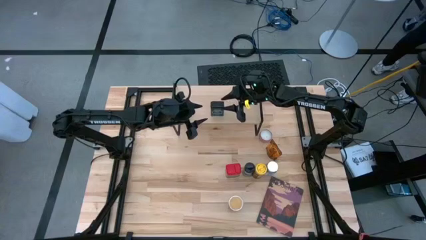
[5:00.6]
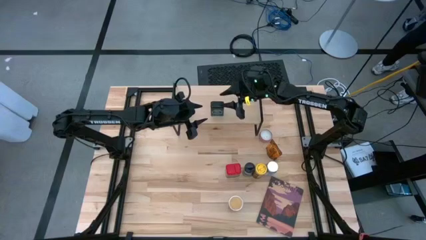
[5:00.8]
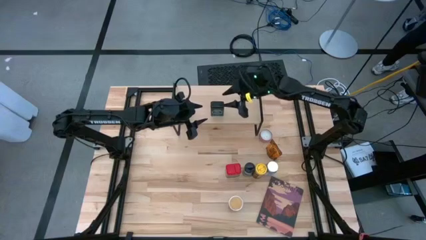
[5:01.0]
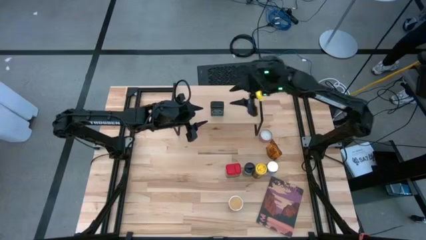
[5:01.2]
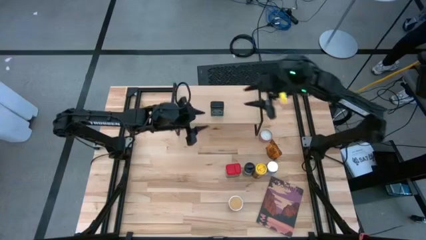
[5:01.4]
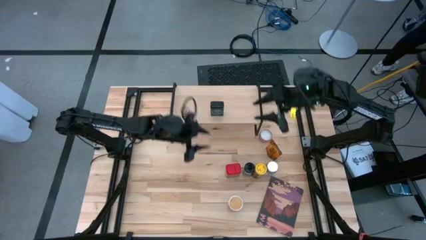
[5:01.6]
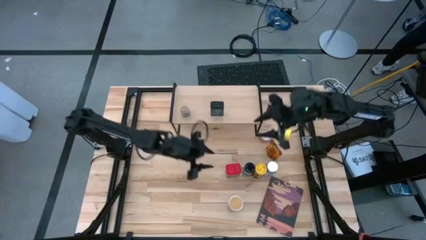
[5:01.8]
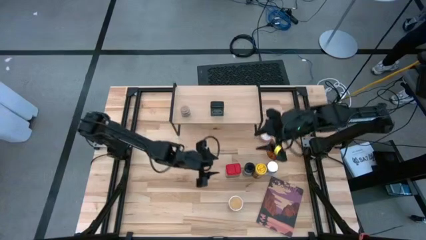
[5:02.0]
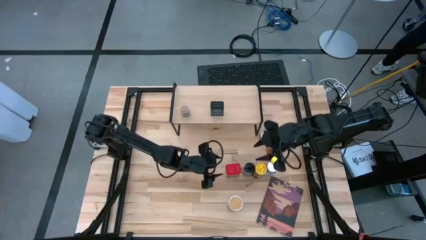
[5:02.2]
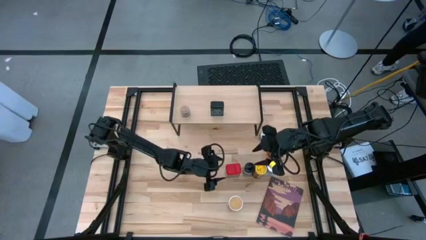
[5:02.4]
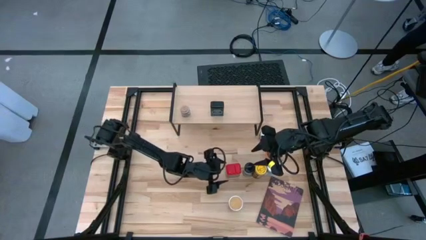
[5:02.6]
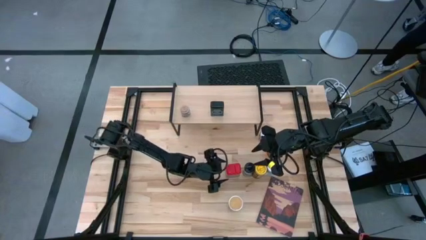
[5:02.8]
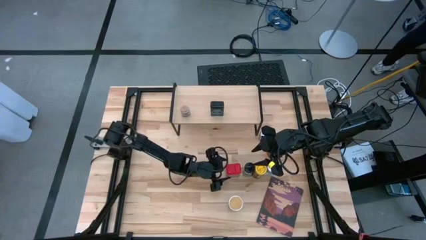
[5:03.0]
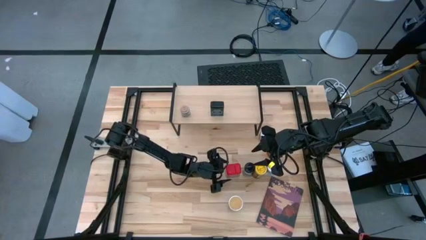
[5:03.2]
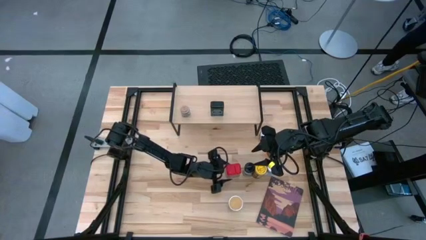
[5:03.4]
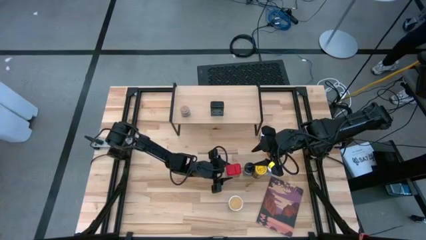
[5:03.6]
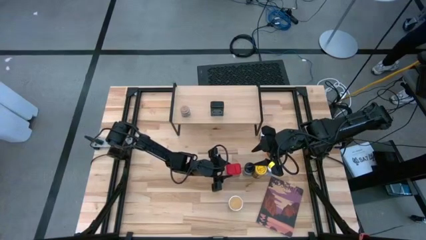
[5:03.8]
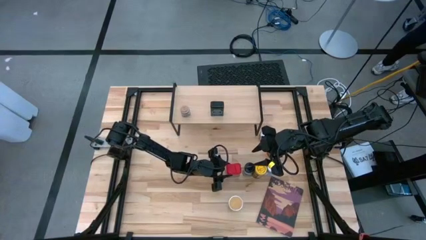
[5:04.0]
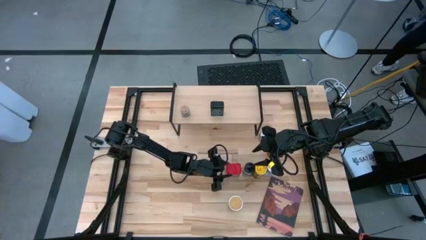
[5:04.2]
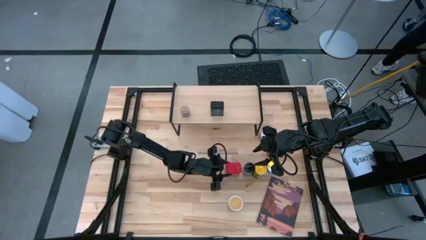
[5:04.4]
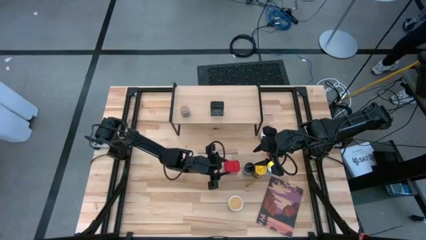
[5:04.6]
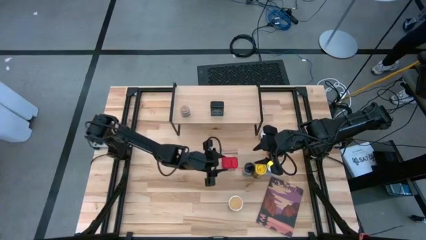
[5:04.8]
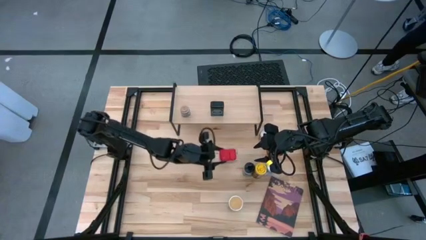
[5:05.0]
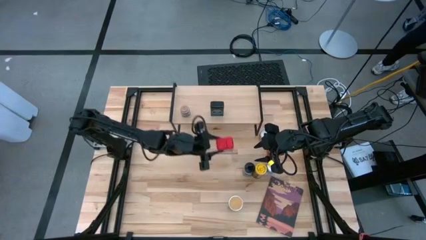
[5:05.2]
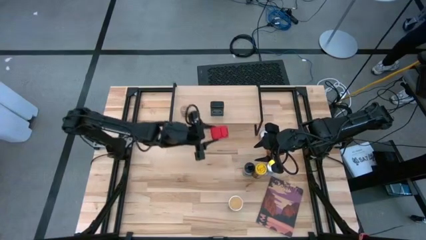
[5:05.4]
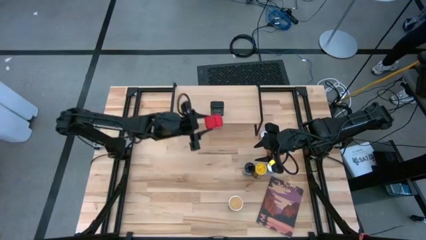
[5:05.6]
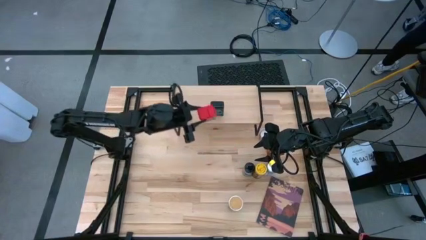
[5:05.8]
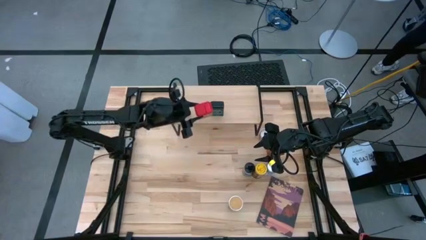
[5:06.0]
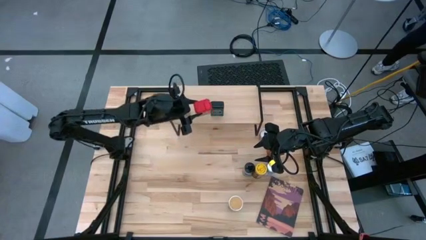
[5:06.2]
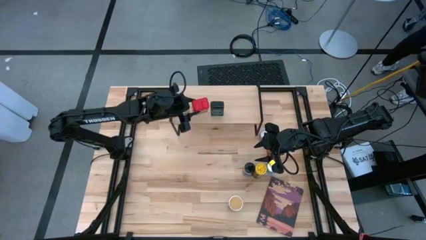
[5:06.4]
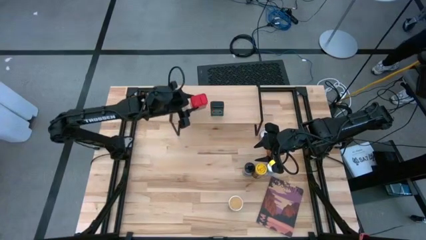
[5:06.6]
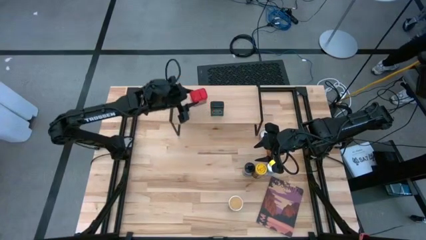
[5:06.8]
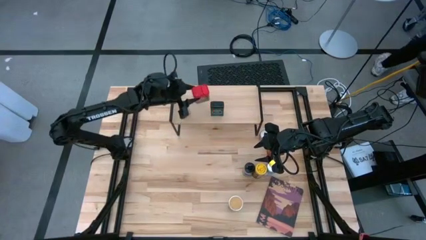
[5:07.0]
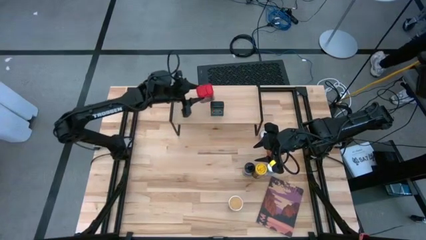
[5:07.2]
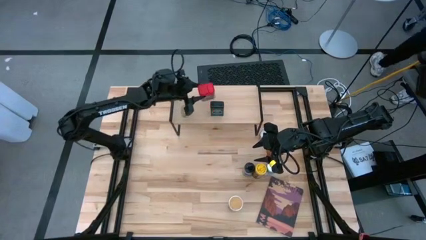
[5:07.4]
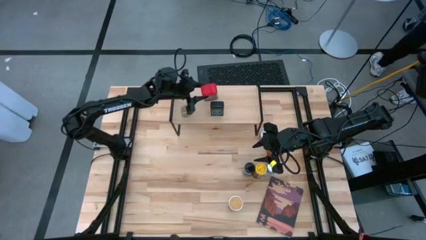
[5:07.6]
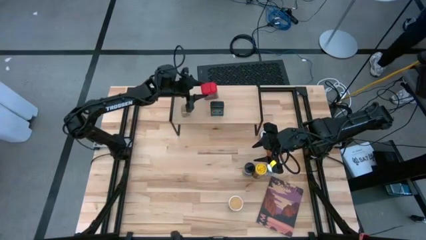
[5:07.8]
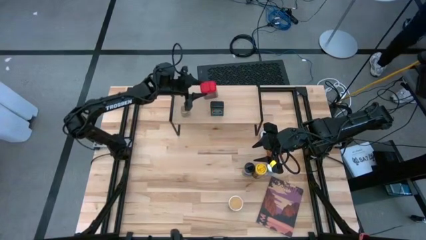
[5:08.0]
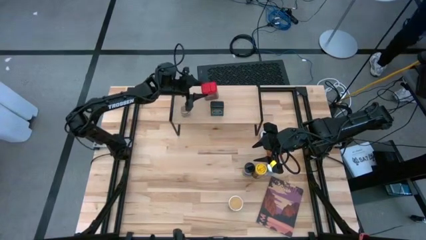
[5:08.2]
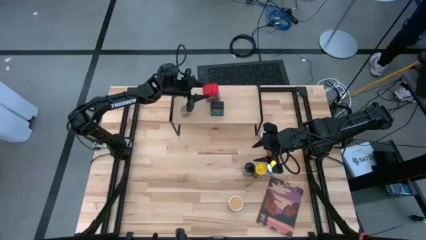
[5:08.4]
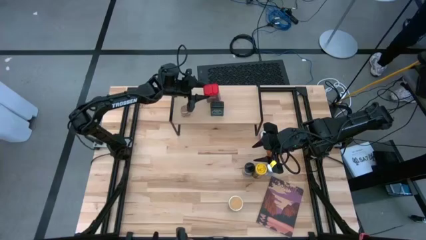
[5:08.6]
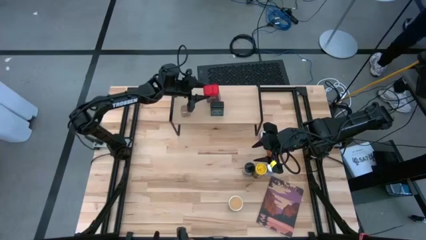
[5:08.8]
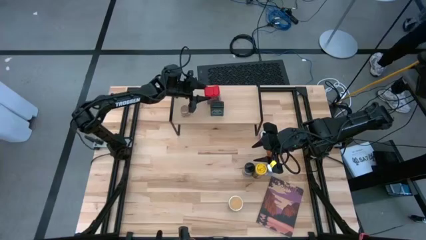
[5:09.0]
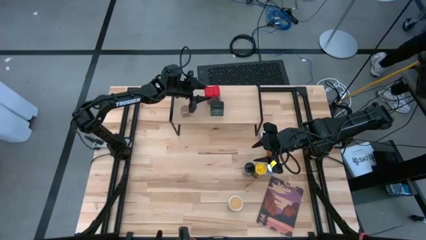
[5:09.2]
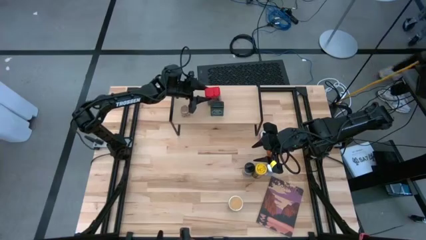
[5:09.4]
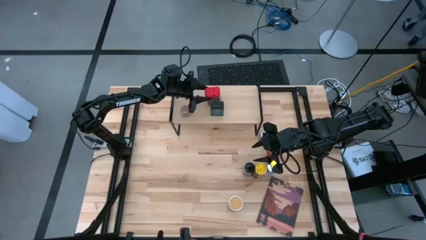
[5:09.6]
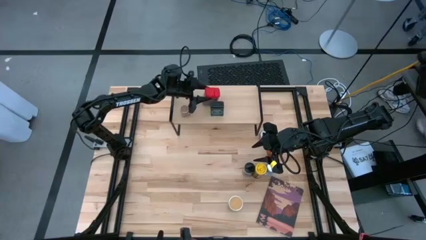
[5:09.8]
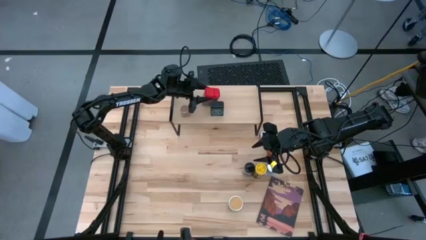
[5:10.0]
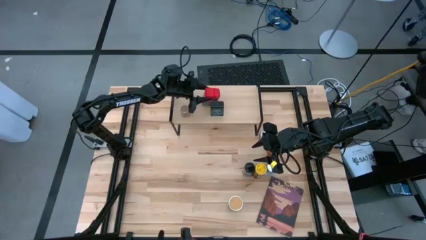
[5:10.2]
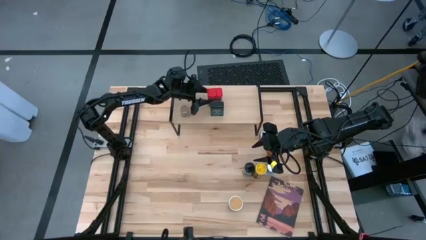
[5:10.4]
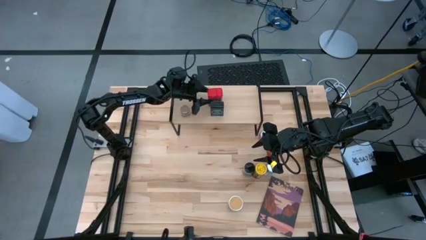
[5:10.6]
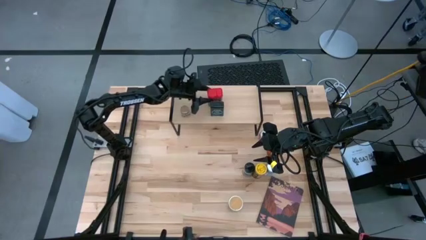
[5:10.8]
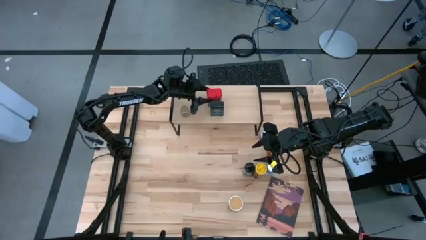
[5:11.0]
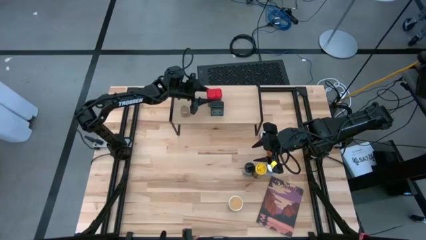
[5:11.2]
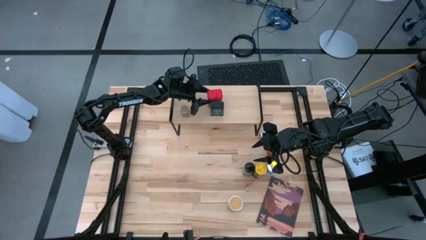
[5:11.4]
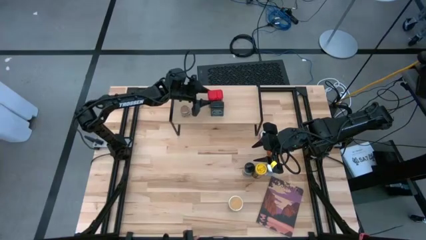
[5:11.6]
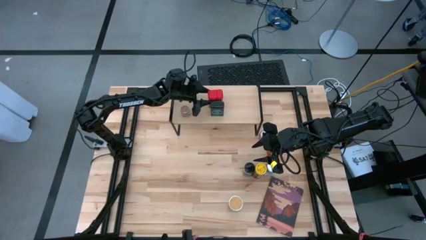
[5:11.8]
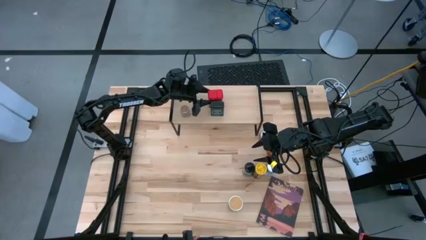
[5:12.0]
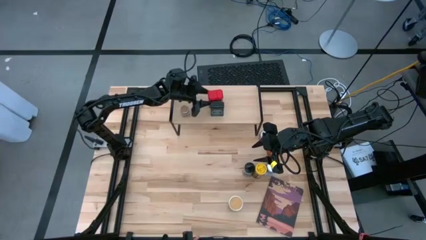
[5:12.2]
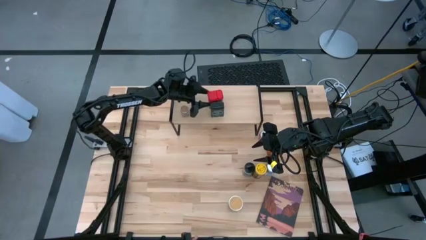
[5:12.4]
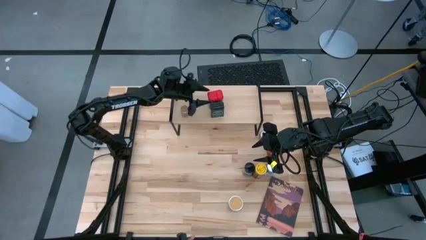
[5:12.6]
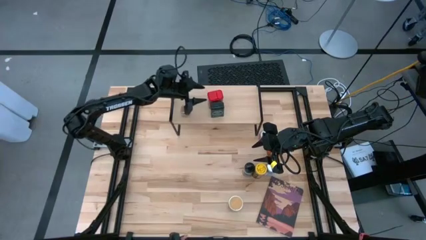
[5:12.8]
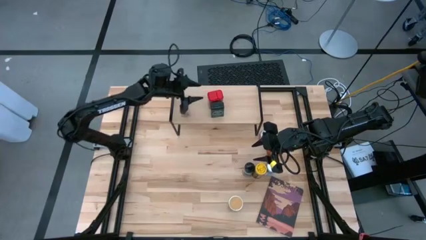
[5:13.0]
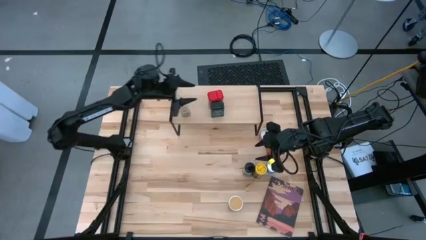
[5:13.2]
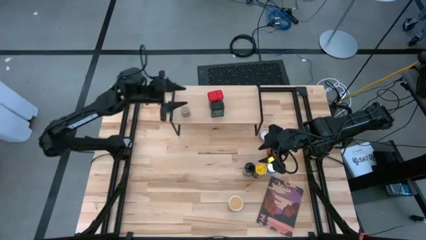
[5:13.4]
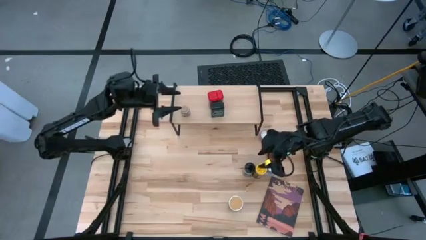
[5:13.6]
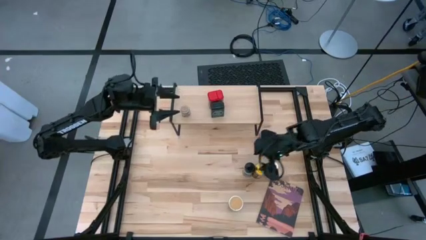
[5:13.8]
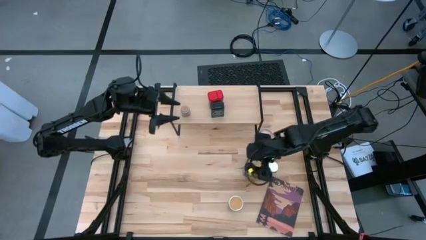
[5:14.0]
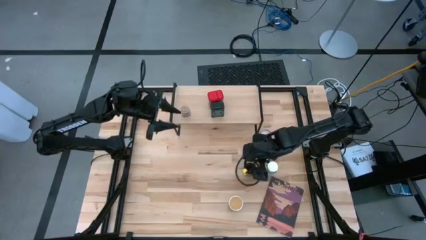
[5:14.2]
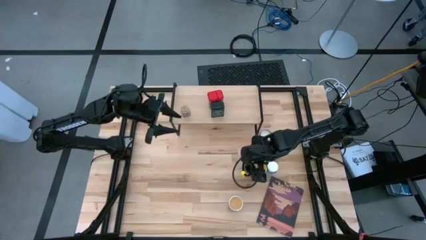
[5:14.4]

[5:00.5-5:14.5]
Task: Shelf spices
Put the red can of spices on the shelf

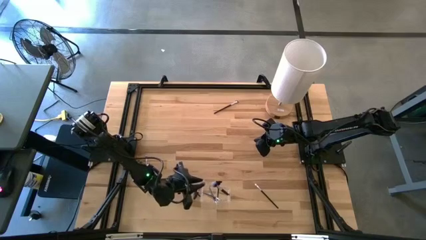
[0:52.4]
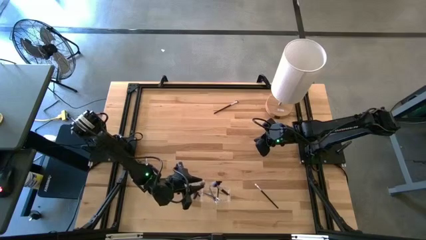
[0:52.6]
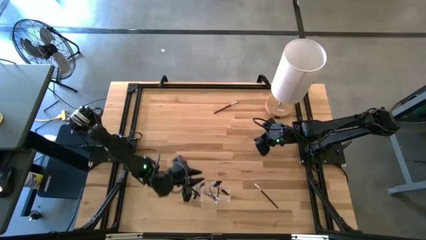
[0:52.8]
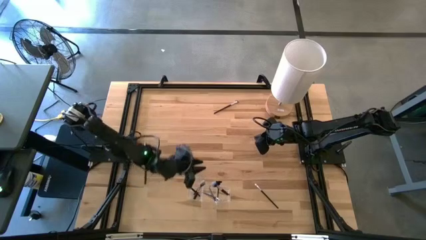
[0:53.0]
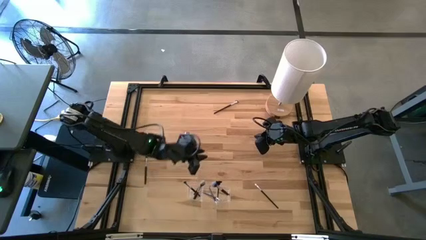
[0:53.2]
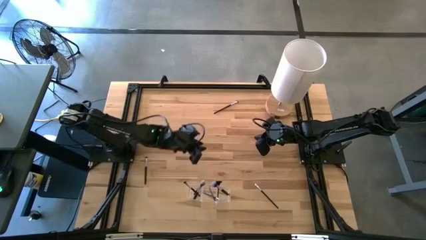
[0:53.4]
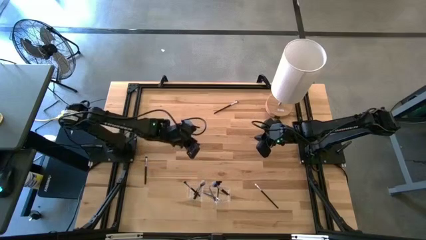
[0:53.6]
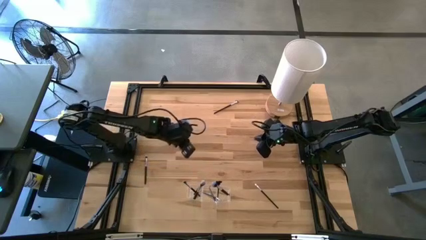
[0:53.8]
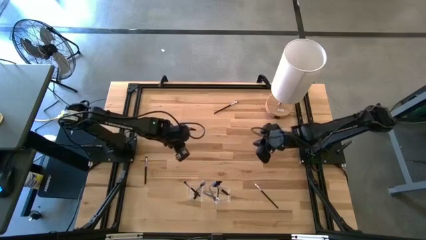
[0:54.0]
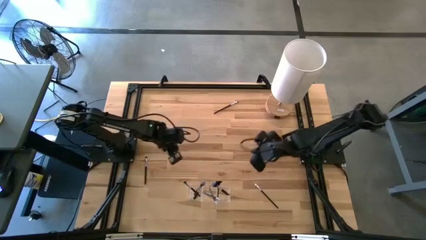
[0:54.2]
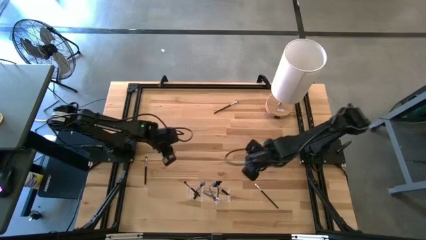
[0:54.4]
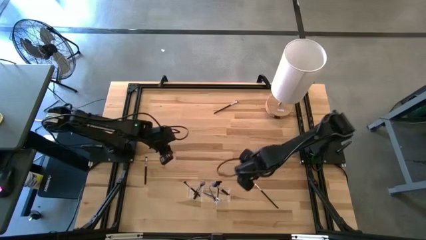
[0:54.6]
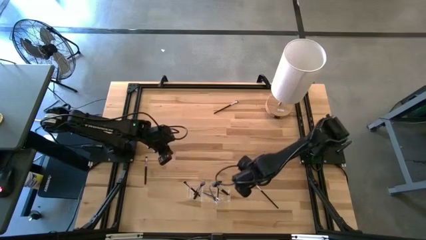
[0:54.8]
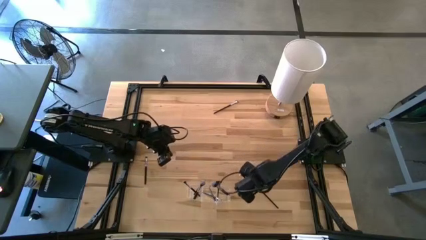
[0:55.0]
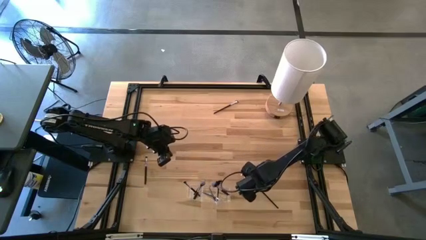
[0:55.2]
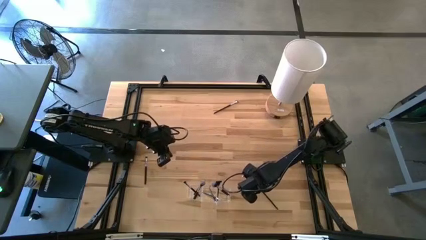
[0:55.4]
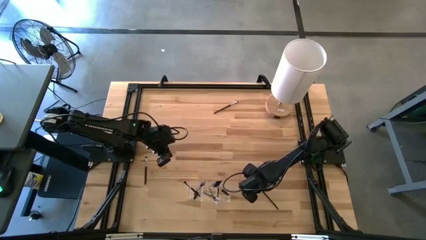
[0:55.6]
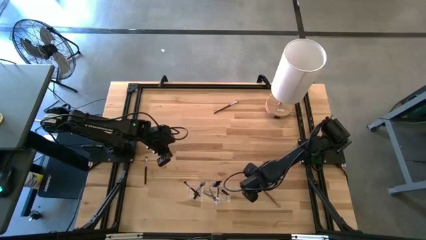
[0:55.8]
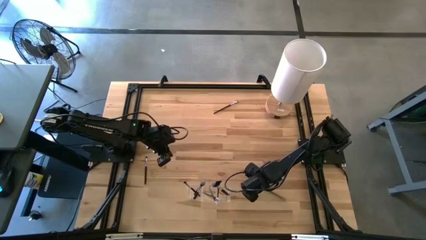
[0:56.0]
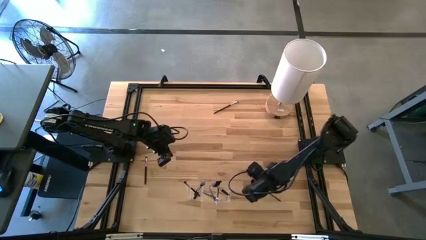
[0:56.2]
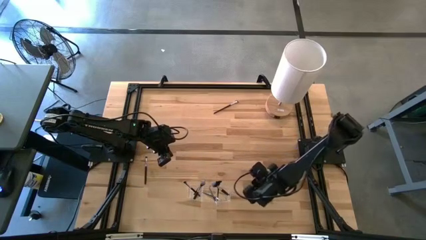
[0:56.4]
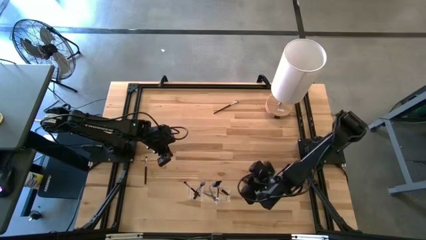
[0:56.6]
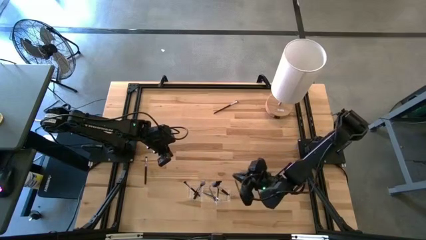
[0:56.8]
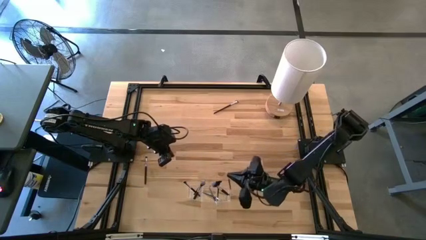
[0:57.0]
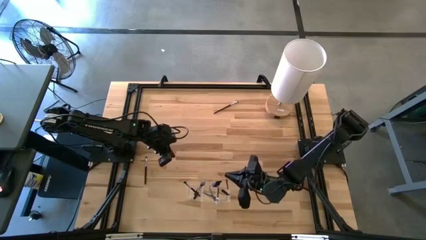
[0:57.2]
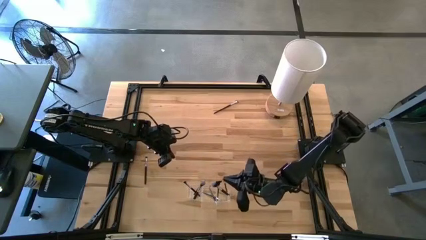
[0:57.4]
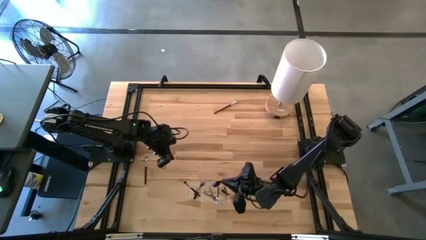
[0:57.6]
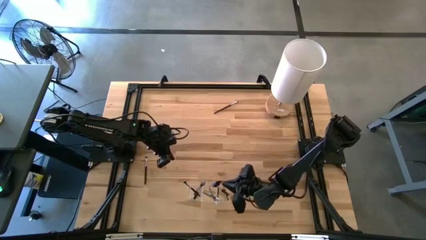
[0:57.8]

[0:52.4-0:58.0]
Task: Put items in baskets/containers
Put the black eyeshadow brush into the transparent organizer
